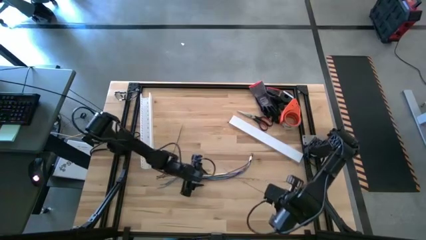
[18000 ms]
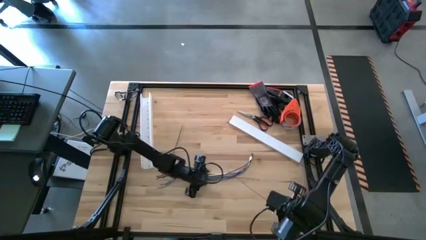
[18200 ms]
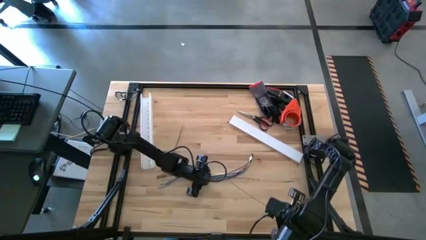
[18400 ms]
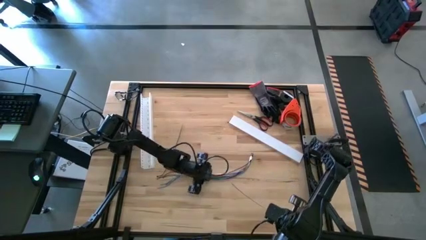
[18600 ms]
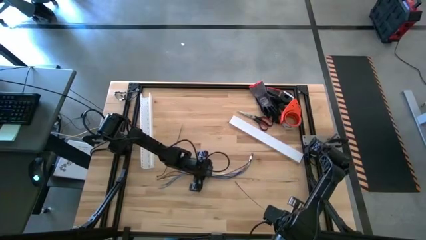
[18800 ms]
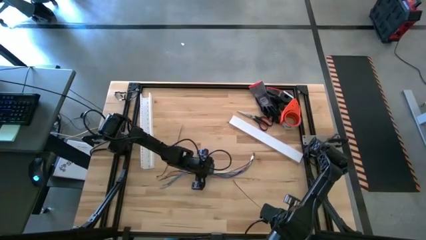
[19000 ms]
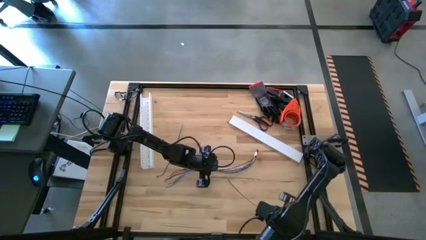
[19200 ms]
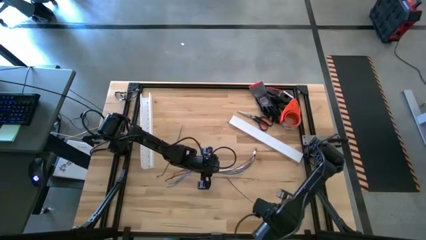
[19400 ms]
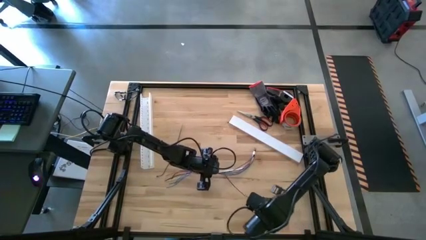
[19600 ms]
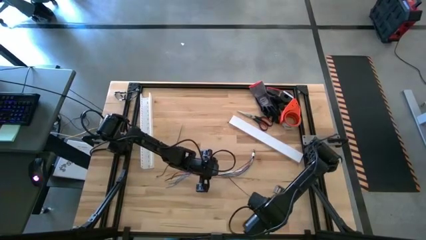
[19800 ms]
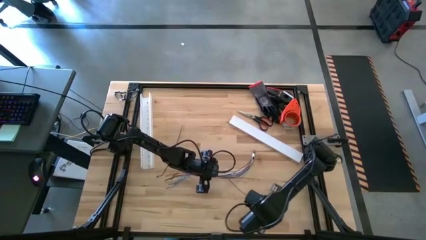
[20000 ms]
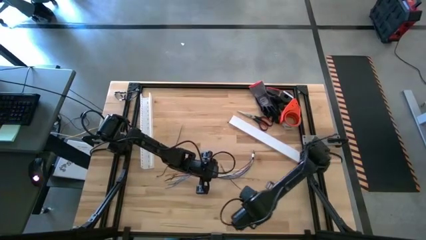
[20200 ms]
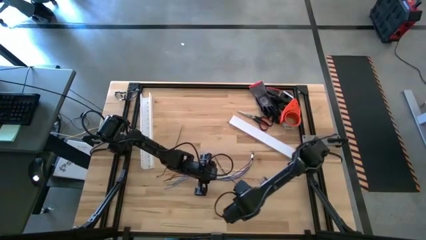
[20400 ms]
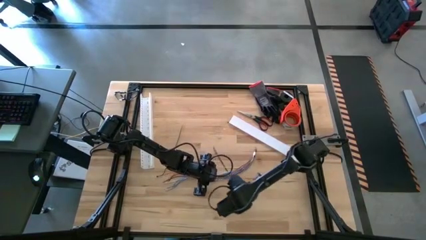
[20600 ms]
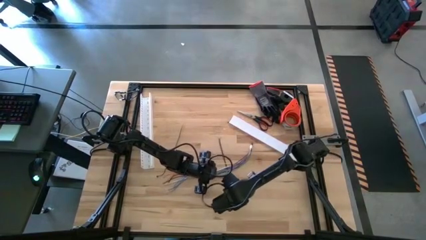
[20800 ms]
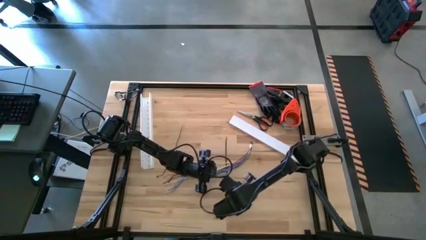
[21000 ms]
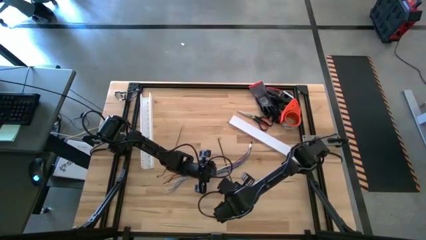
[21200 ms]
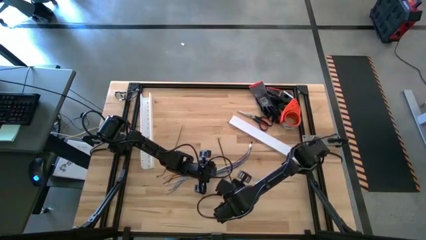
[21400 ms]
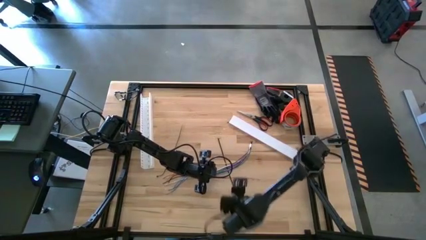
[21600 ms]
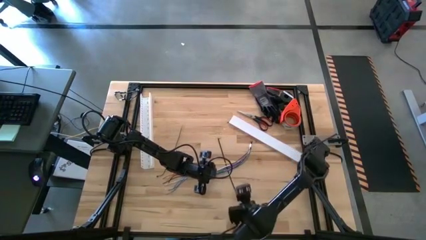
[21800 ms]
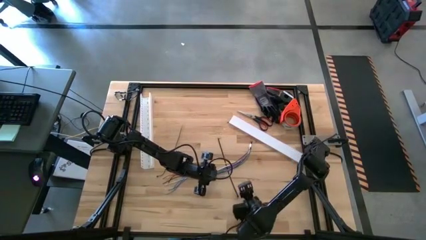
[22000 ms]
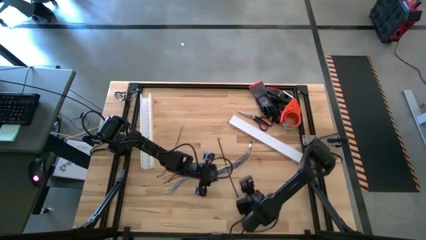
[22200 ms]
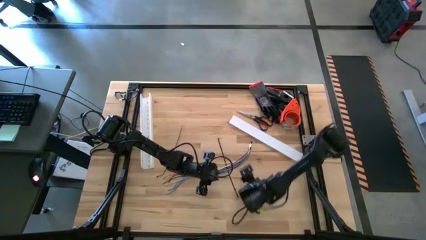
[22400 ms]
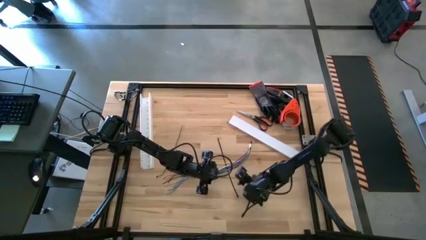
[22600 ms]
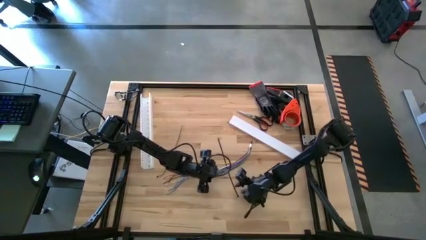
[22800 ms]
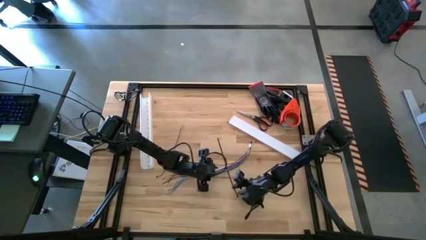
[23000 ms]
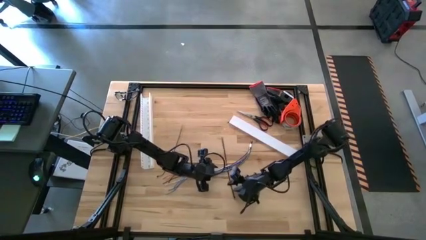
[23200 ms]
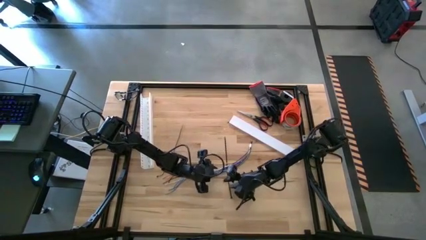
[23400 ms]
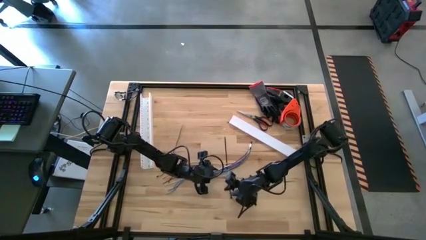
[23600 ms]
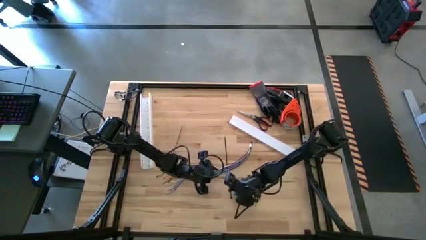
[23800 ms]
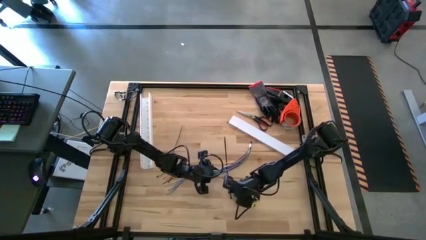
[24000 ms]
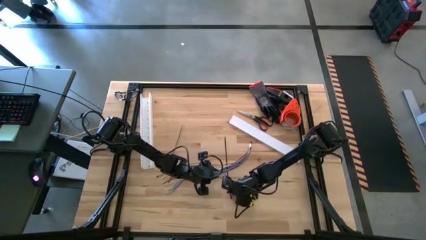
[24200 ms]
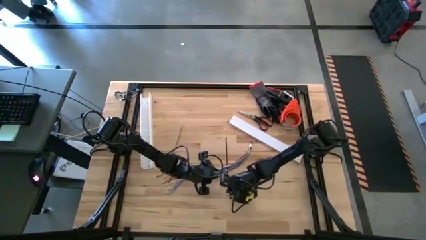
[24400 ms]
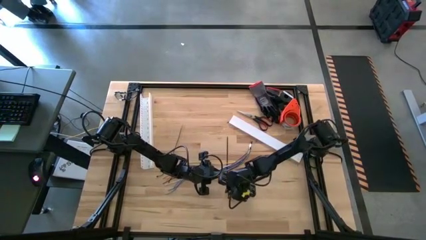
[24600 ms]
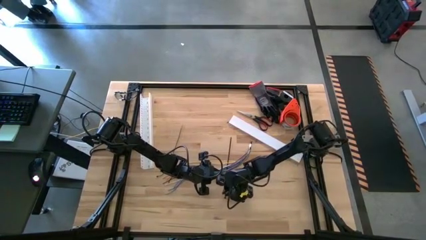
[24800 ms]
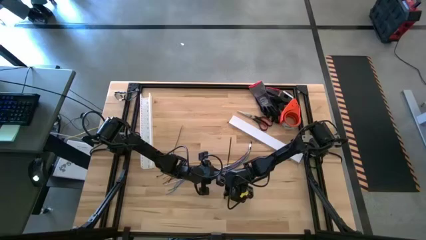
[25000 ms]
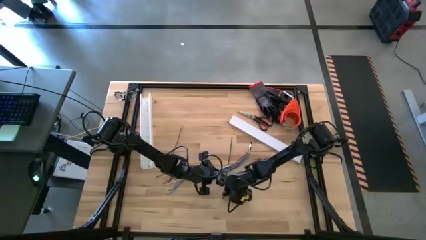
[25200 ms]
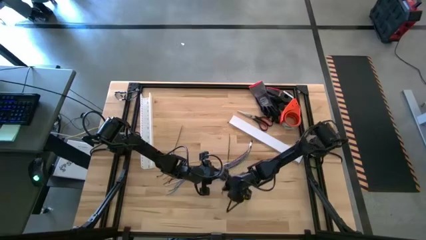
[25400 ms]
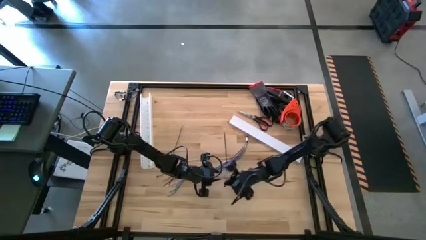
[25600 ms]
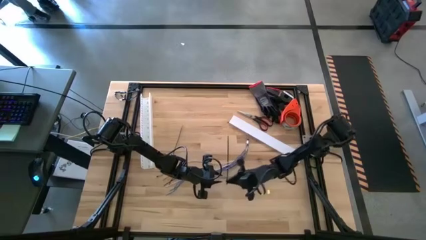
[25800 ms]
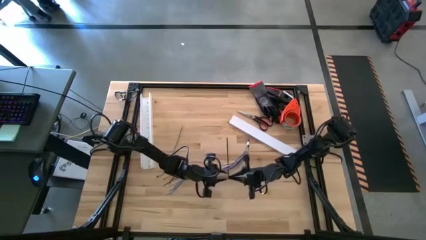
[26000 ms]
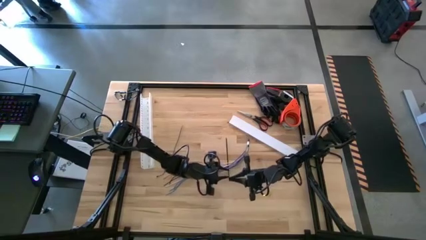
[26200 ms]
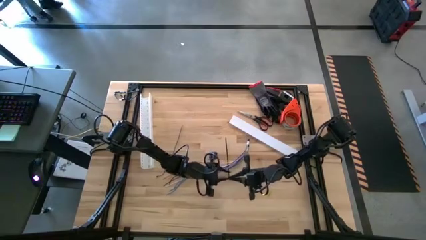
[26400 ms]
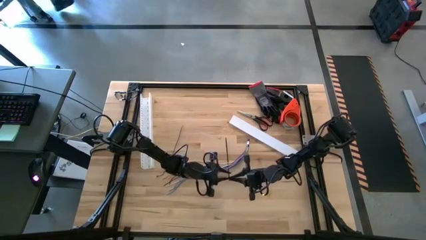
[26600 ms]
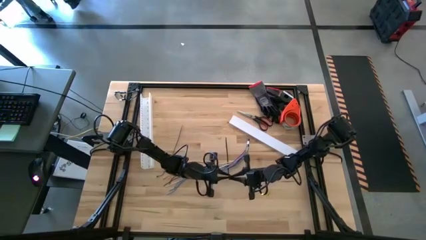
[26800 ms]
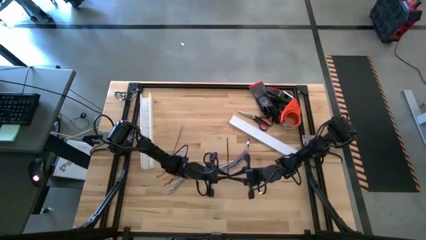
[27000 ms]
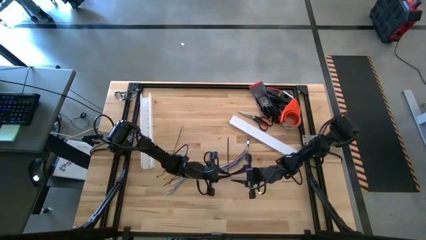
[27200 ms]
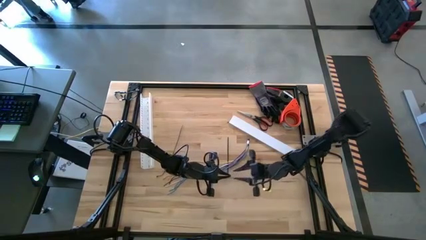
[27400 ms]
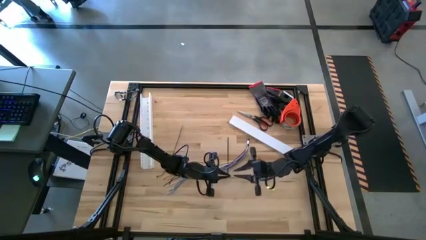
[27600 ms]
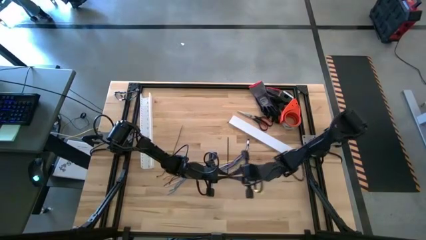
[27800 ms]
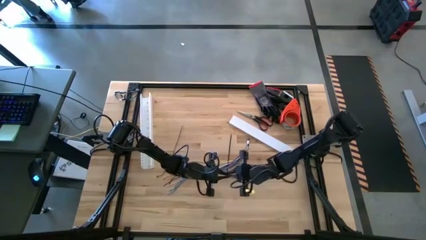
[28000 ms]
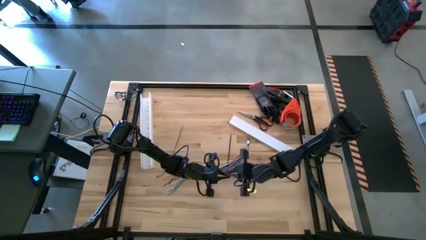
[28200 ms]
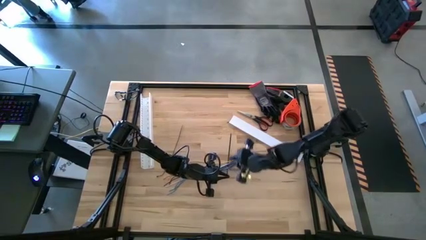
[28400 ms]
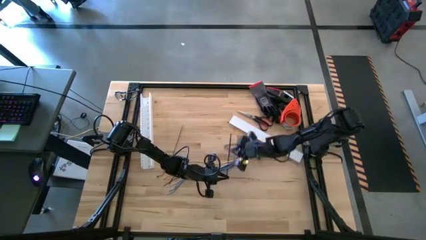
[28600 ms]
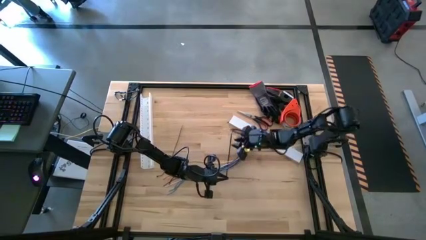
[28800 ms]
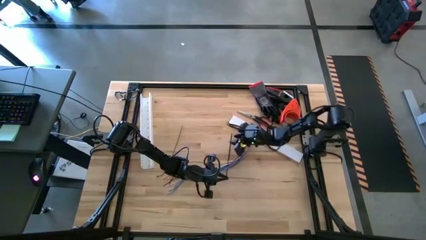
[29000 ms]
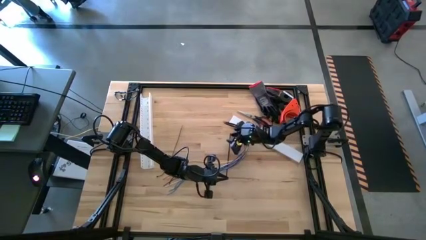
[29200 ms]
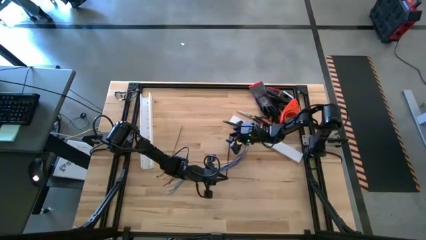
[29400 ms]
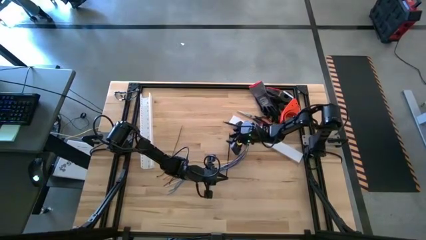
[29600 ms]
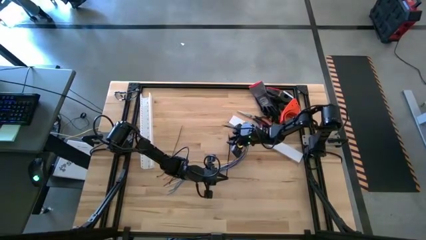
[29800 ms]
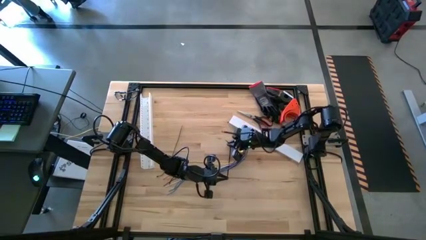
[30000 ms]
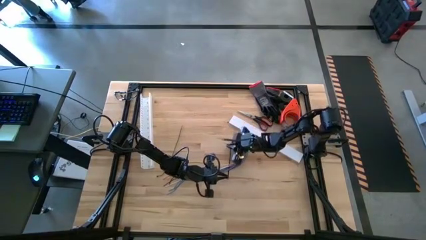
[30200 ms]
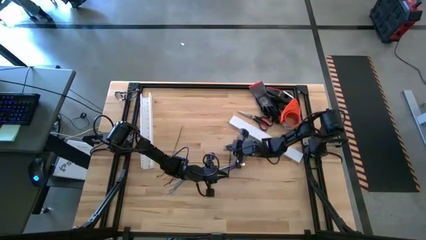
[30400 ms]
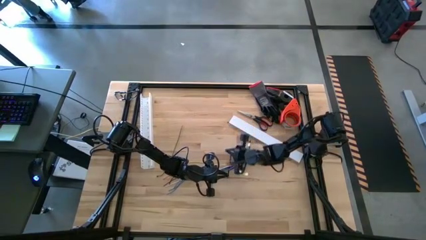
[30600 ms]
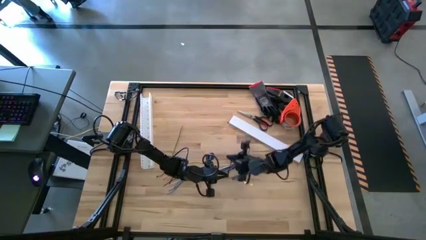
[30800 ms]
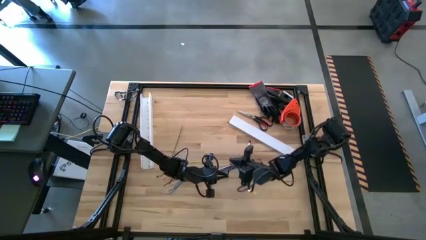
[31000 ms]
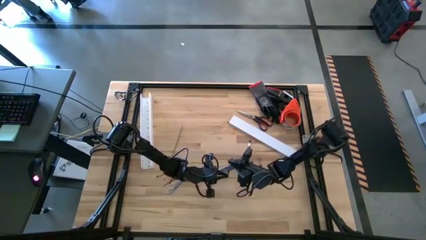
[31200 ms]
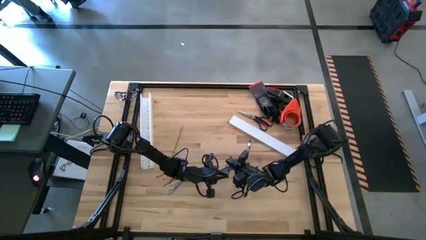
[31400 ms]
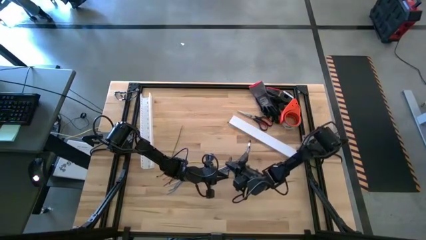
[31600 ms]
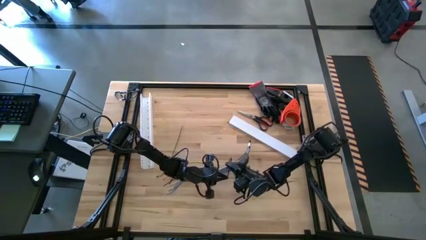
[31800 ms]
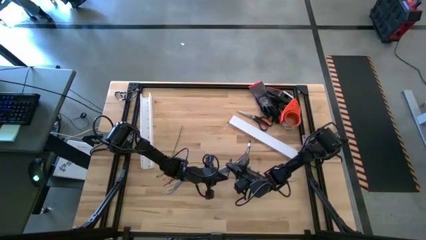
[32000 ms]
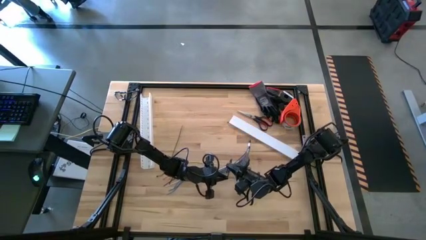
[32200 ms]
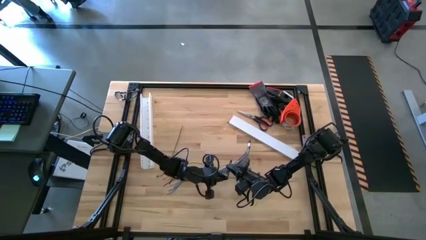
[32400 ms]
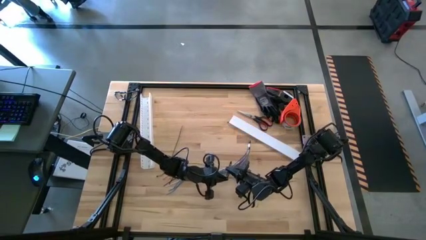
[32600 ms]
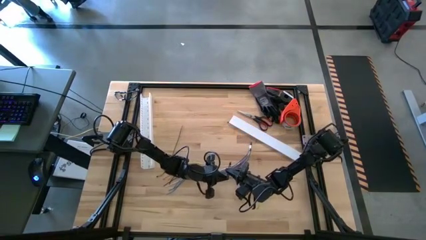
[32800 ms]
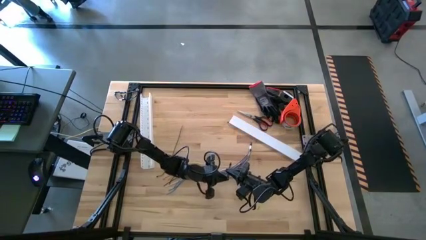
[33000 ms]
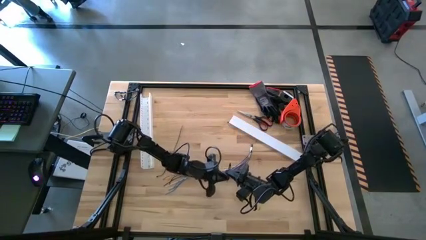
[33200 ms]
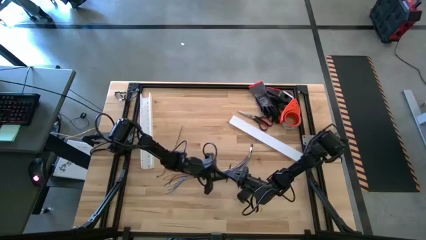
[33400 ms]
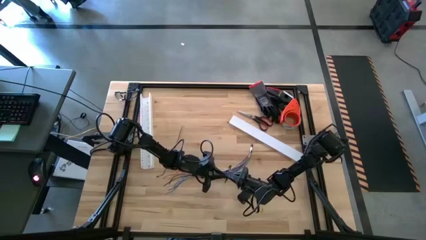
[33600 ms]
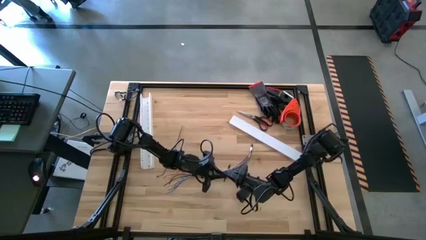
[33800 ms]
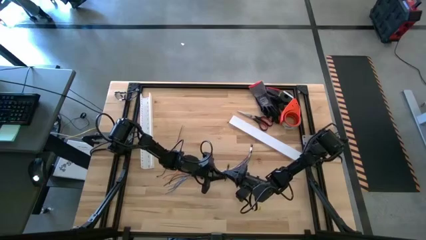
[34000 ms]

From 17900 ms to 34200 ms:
Task: Ziptie cables
Wrap the zip tie on the cable
